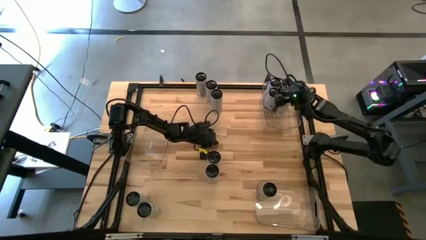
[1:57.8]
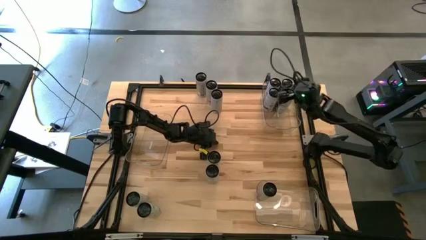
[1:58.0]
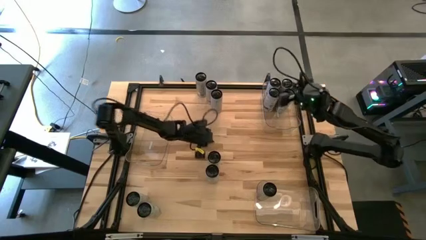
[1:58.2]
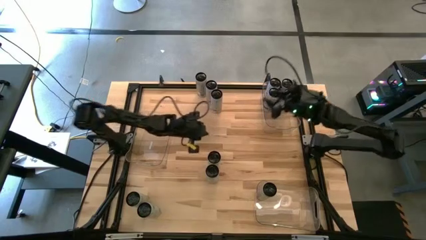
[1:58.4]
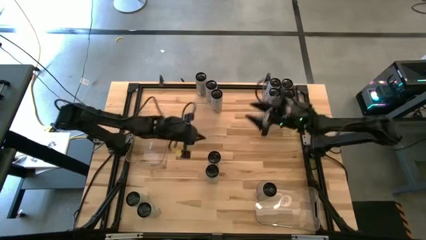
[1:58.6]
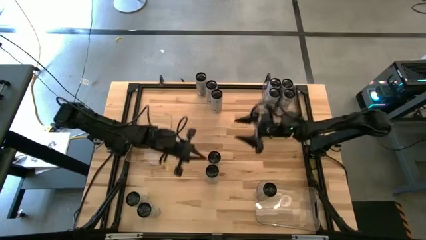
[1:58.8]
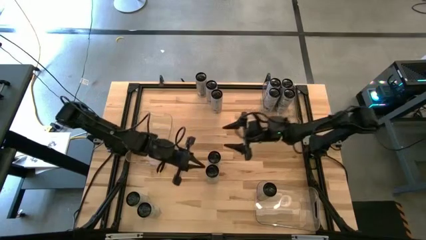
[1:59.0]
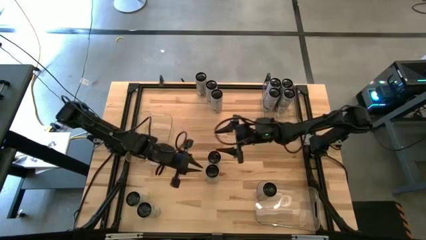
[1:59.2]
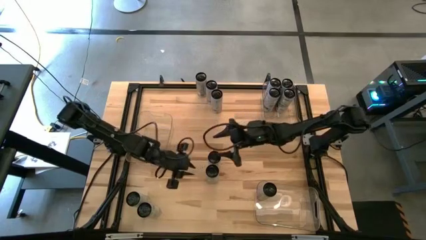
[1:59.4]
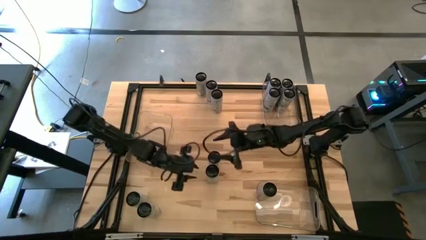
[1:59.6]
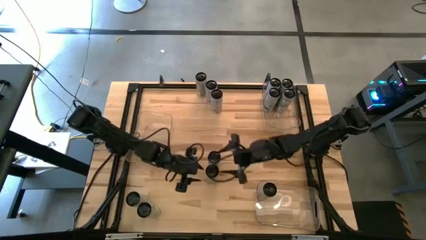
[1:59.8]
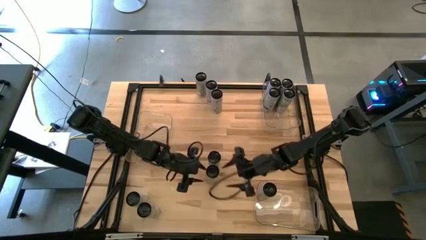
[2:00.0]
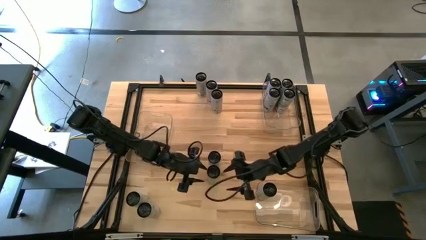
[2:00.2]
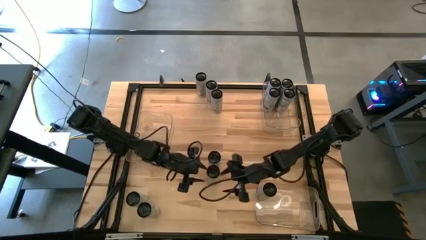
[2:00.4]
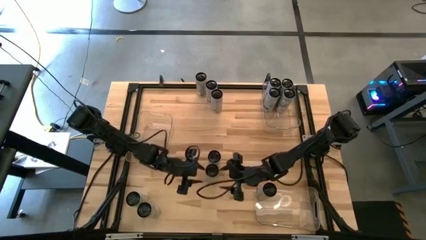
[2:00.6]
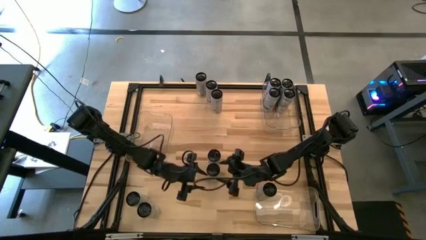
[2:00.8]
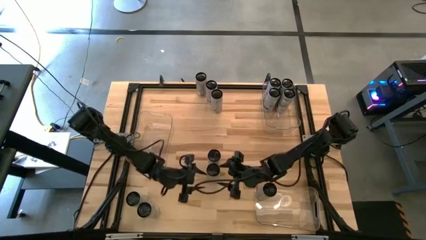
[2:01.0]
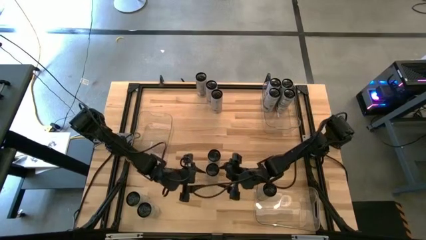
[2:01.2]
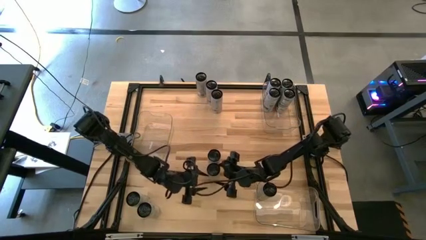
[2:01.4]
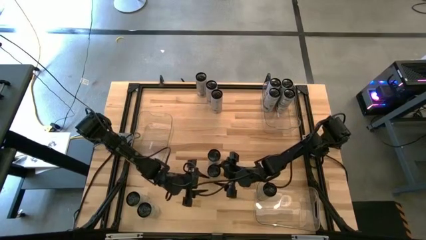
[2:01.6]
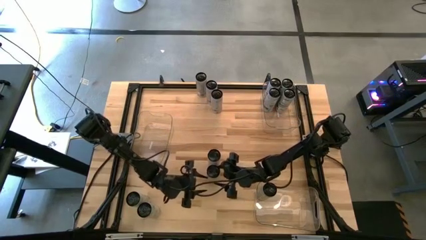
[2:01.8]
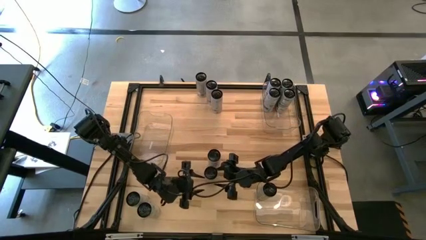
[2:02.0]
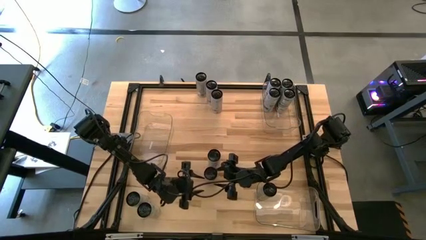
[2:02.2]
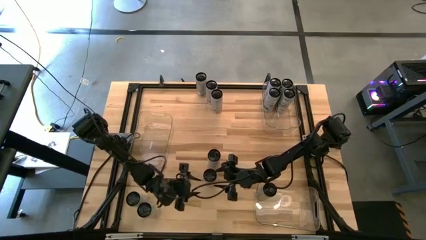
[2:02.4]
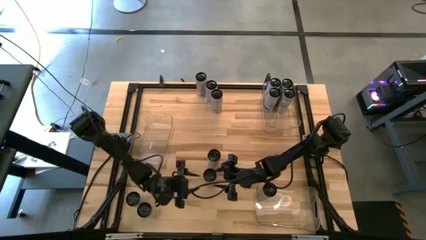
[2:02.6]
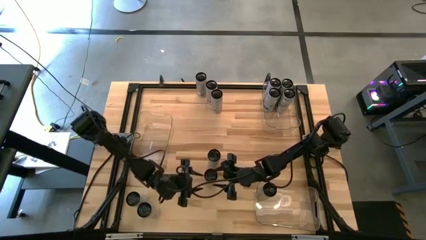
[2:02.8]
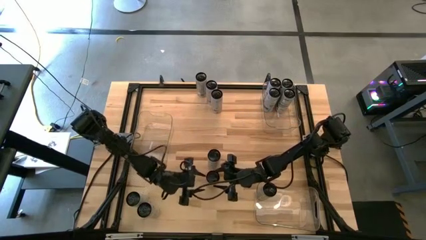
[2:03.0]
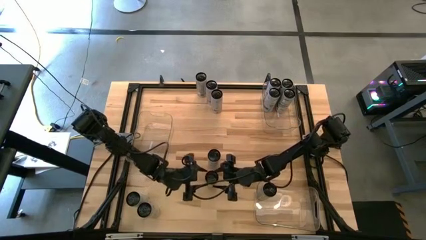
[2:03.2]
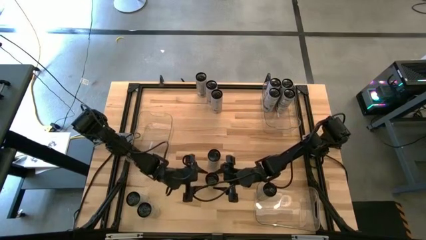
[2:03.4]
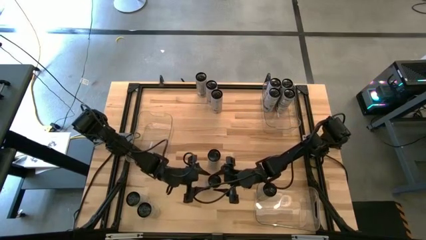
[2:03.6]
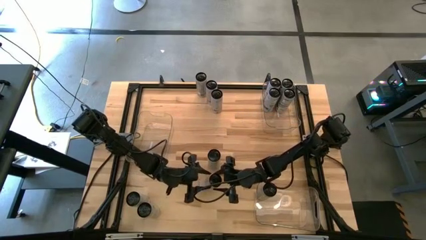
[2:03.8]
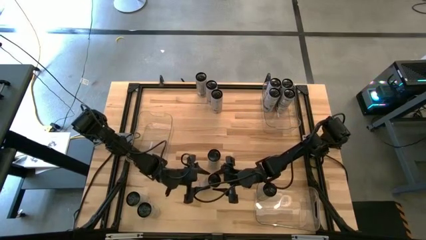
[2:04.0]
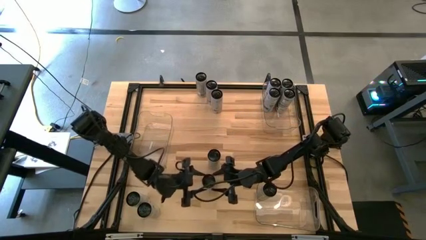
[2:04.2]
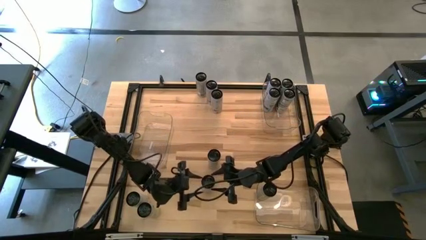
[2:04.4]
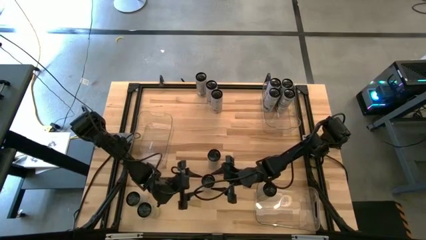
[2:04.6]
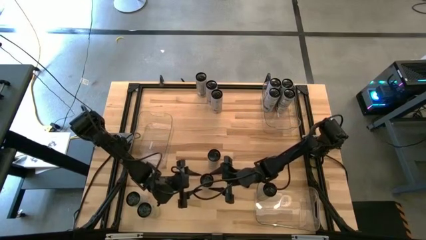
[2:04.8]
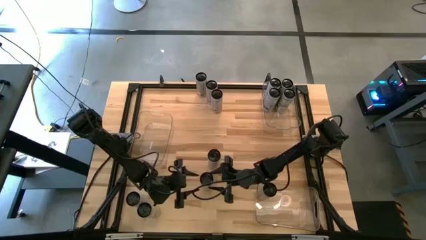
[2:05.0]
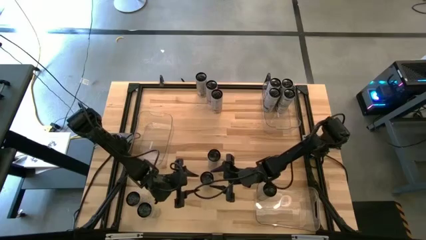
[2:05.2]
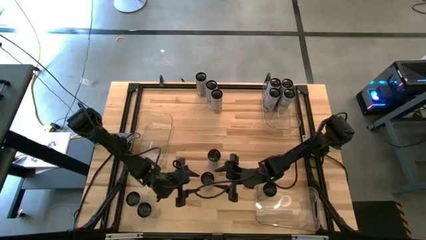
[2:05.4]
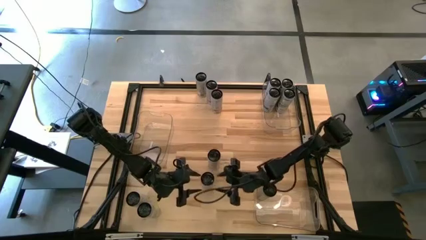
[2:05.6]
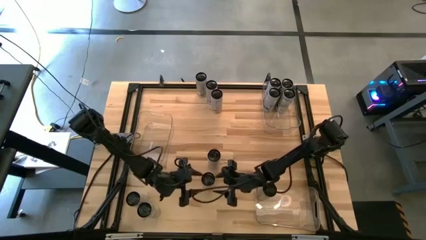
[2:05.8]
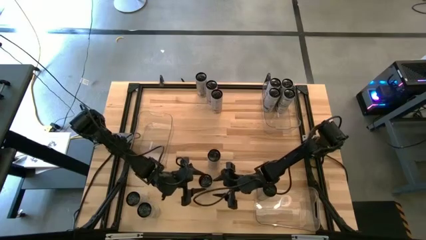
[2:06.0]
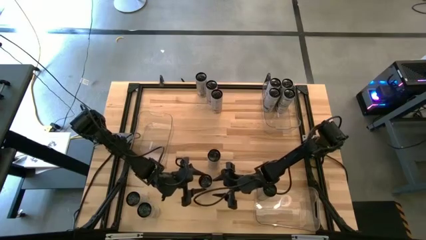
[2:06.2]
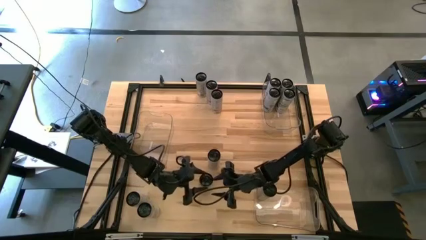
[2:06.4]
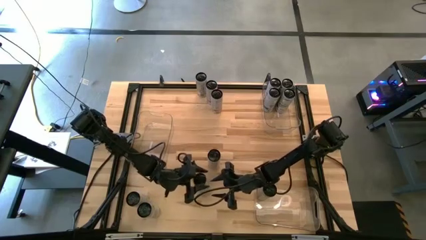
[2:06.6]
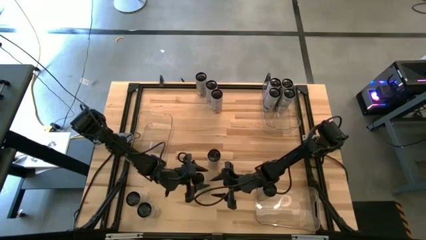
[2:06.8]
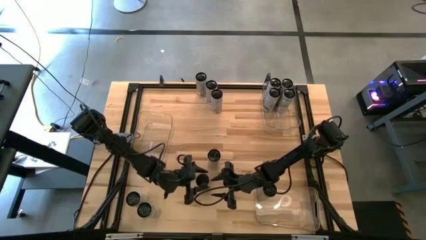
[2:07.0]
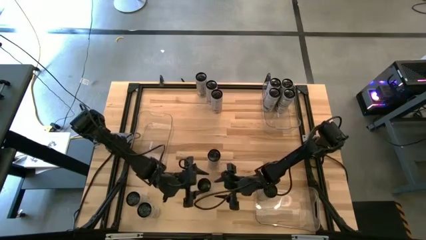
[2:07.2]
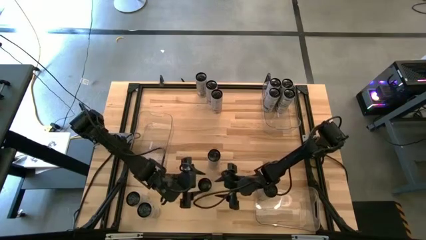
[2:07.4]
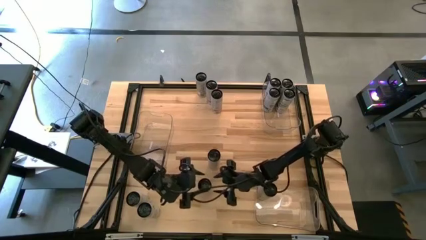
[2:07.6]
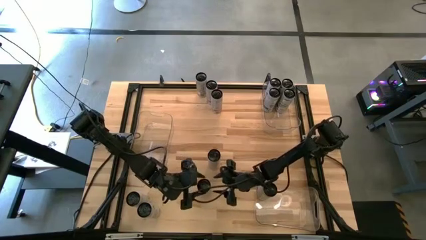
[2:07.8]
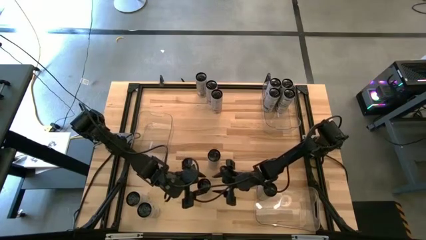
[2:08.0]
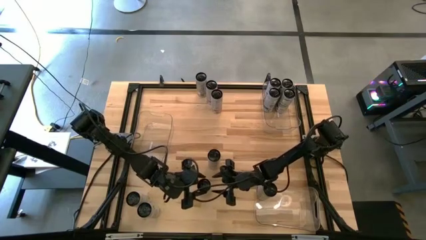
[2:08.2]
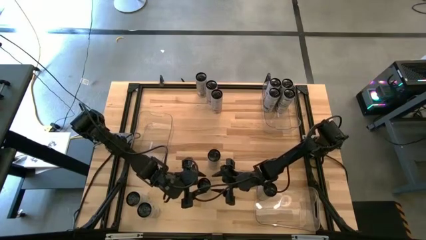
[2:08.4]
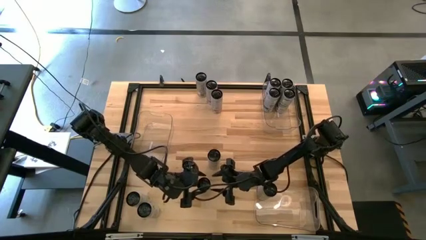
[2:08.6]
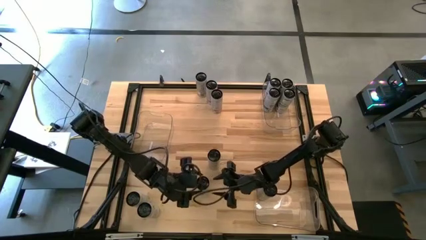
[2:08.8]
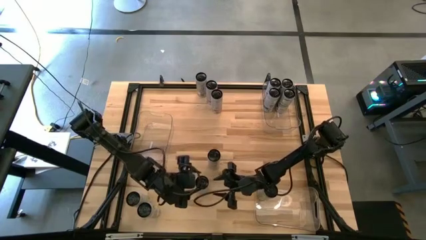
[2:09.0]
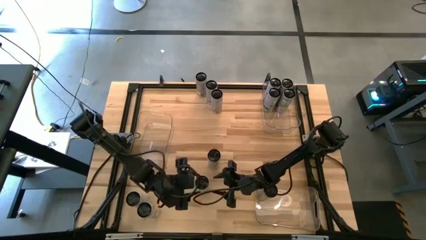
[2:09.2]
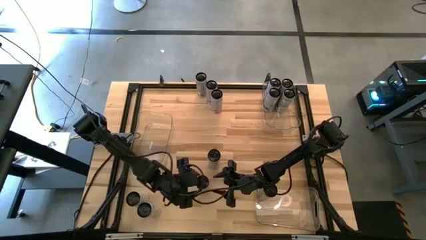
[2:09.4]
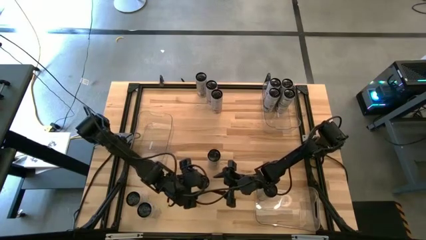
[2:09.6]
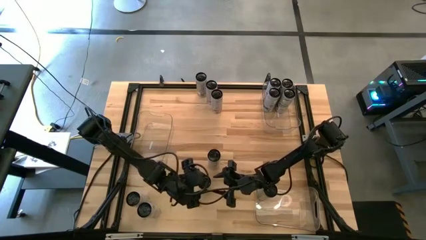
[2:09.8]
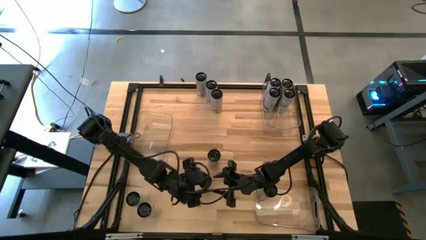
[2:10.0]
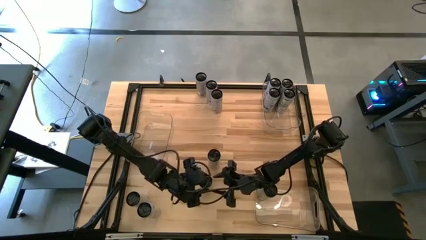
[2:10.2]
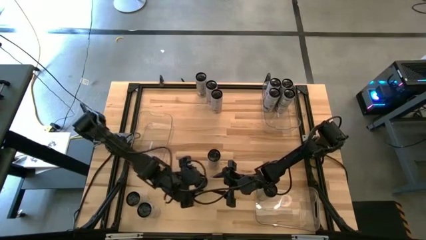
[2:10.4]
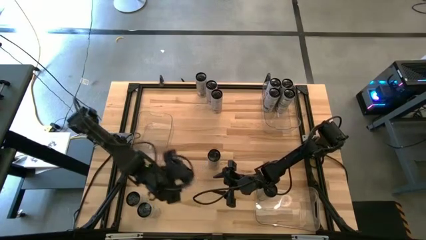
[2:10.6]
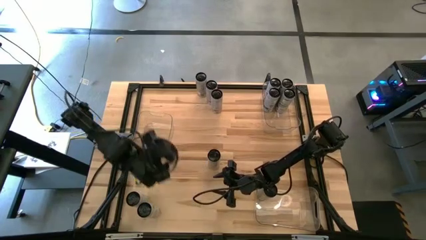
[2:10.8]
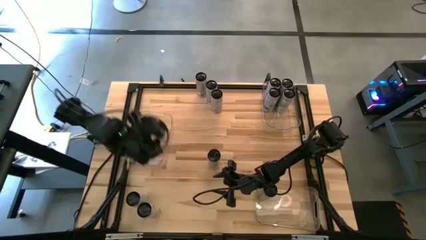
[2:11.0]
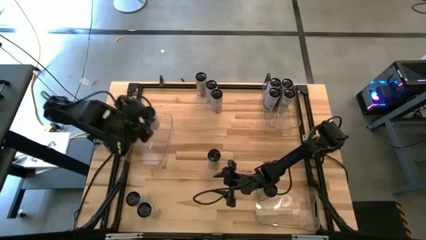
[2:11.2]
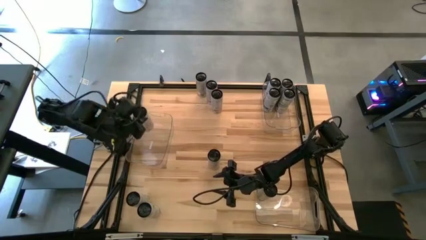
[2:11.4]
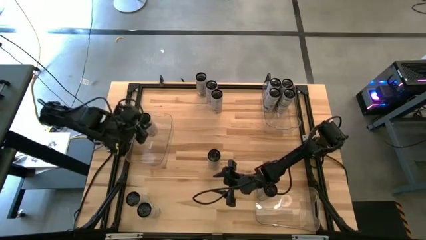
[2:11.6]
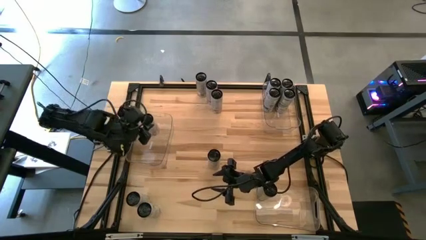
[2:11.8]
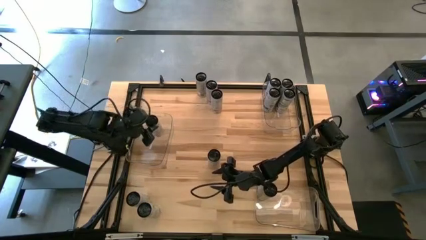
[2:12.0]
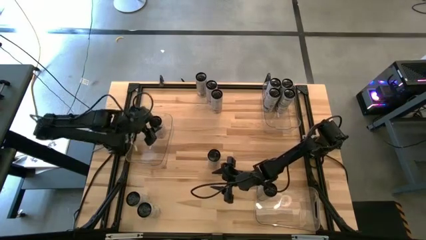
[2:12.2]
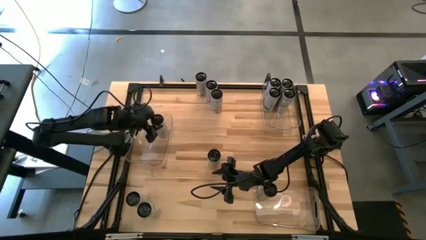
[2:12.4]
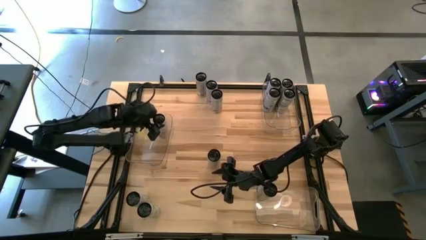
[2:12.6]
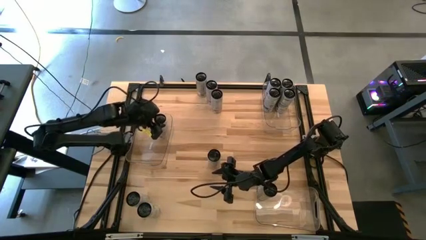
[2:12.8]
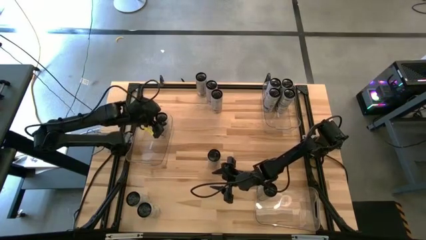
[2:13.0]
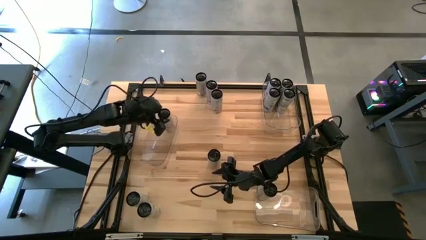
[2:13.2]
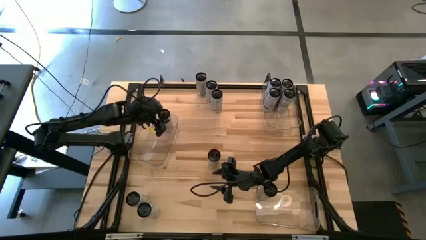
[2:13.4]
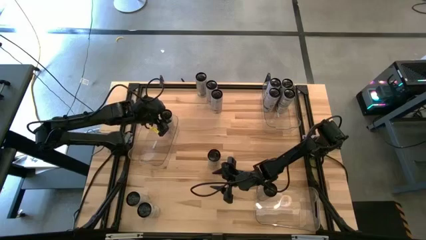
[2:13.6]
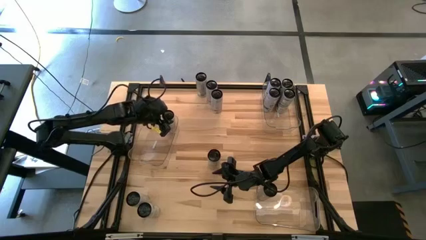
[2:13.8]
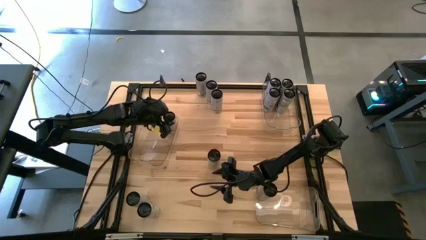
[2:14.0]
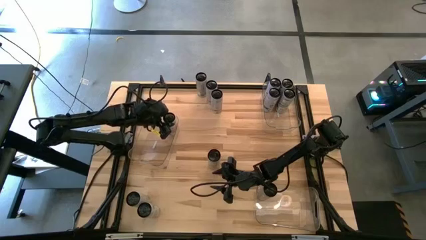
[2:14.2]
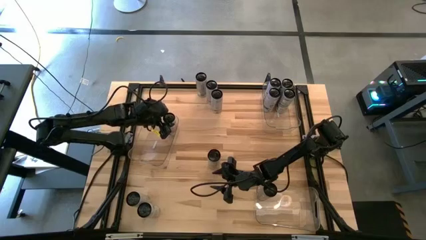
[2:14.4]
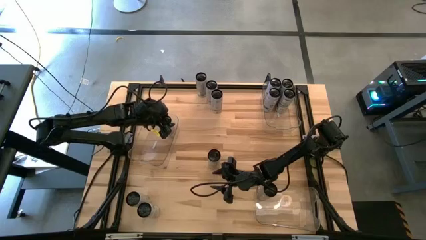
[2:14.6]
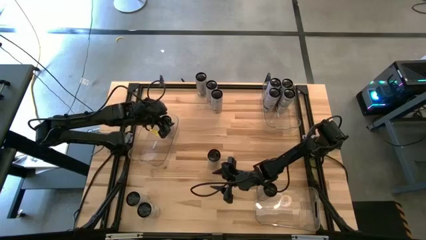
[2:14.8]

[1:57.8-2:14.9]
Task: Sort soda cans
Put the white-pink soda can into the middle transparent bin
